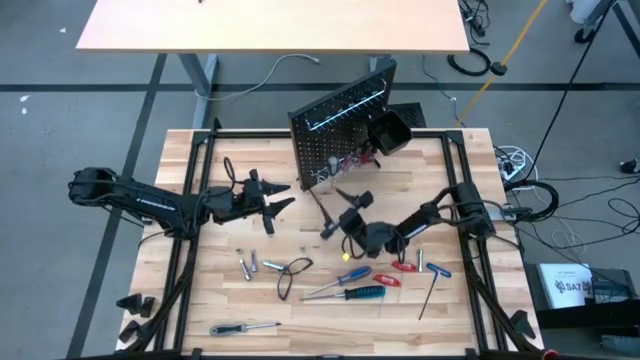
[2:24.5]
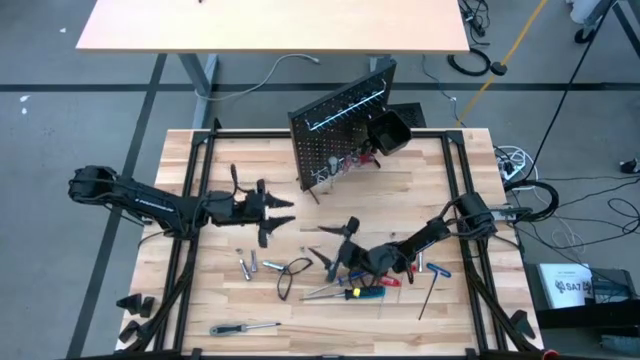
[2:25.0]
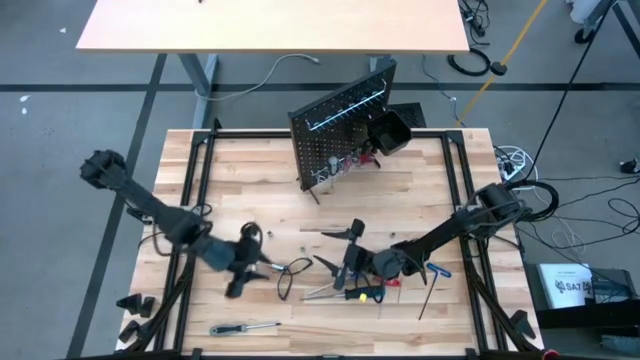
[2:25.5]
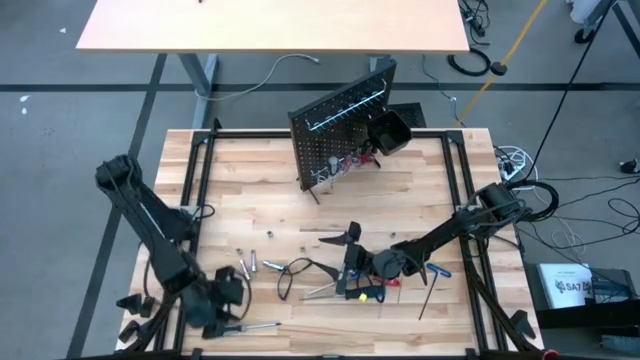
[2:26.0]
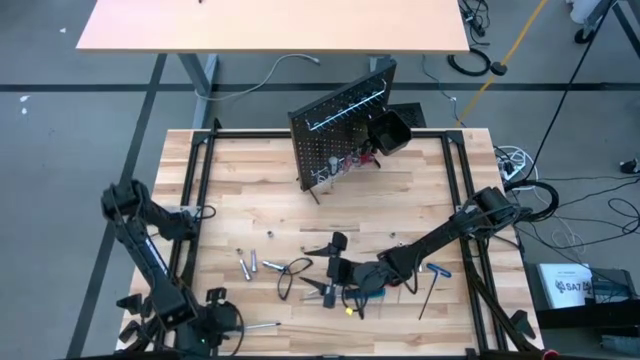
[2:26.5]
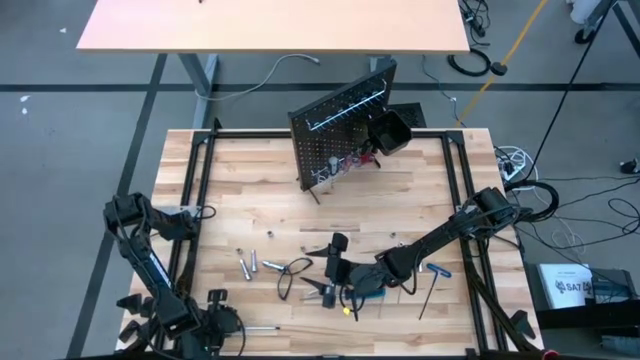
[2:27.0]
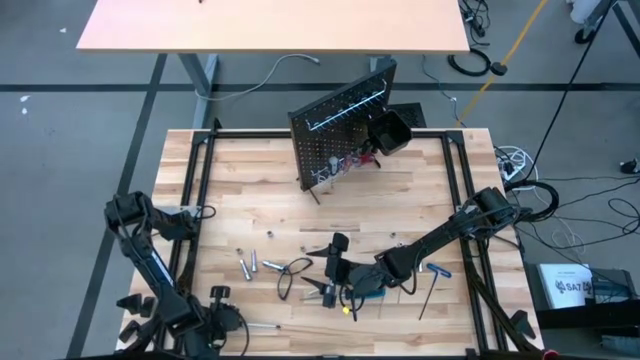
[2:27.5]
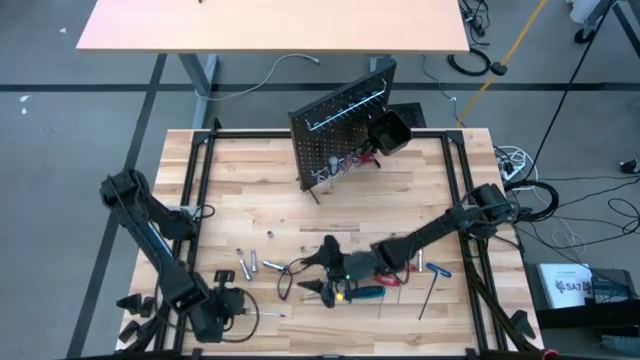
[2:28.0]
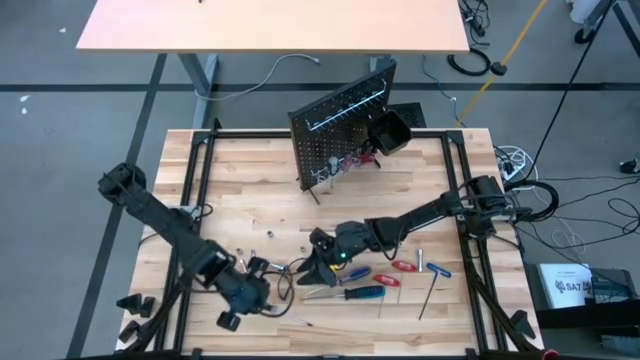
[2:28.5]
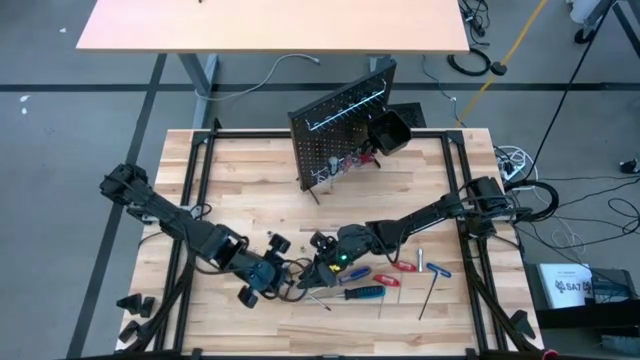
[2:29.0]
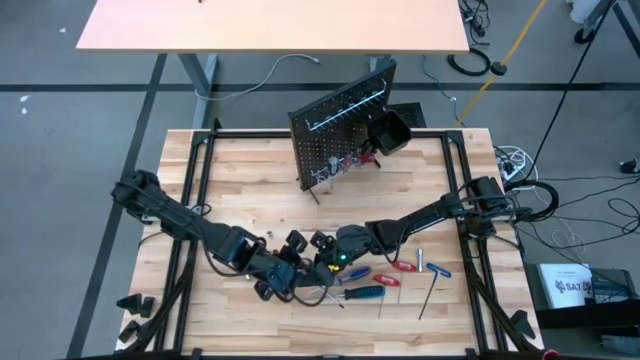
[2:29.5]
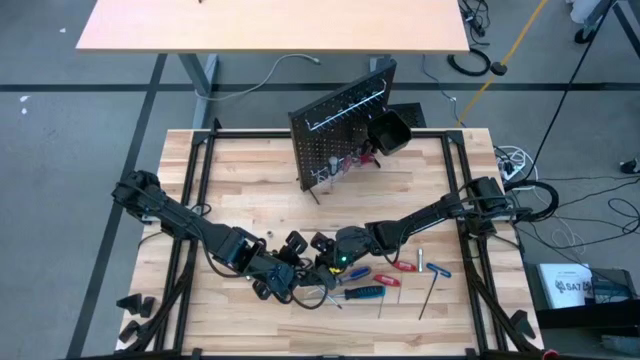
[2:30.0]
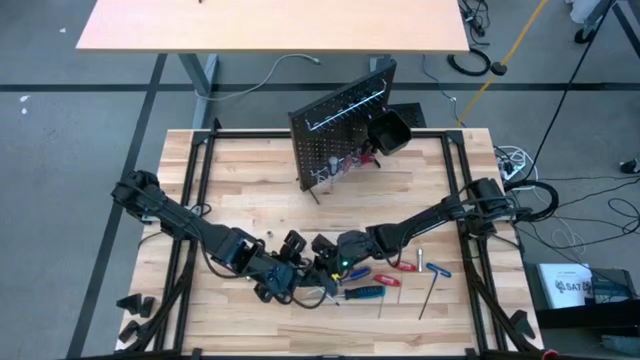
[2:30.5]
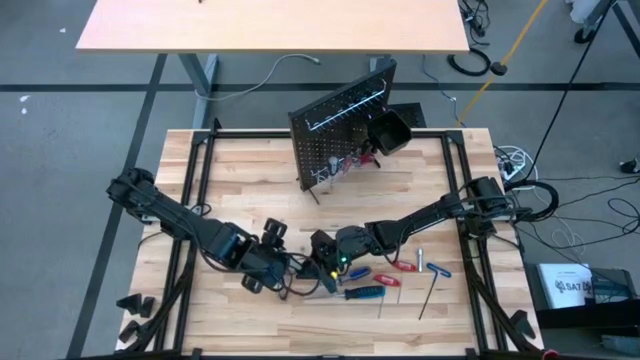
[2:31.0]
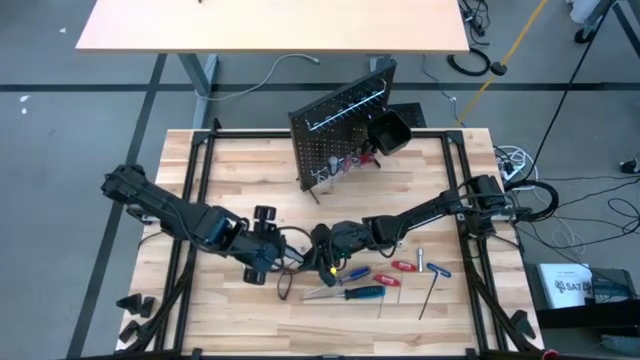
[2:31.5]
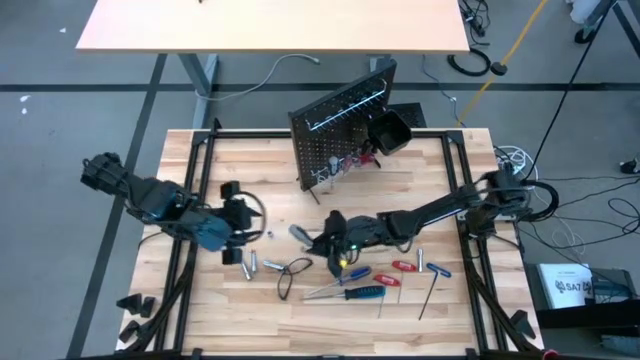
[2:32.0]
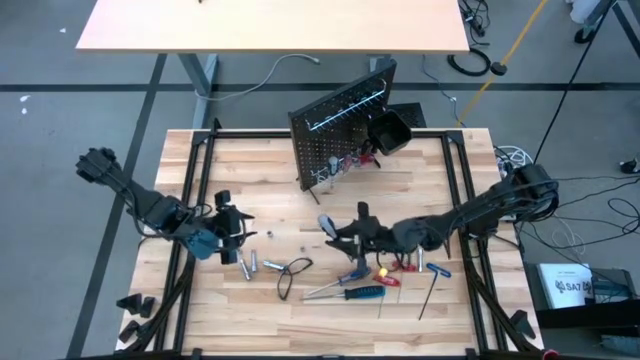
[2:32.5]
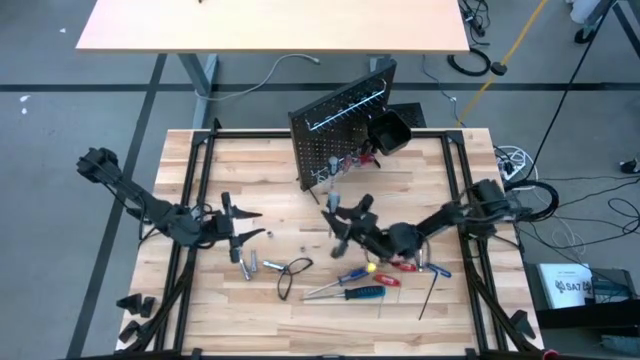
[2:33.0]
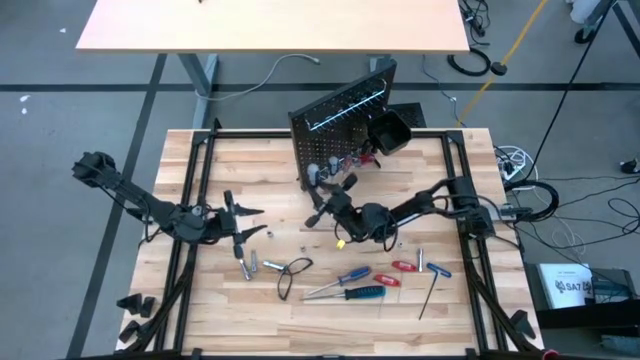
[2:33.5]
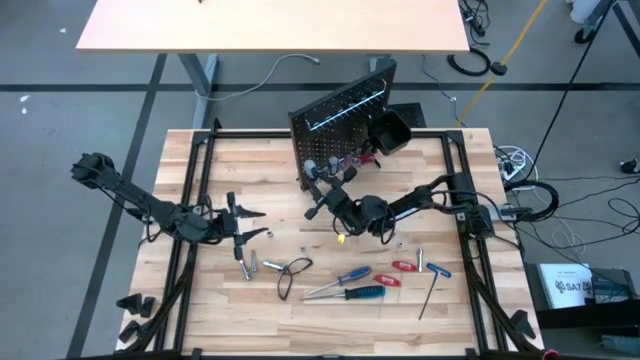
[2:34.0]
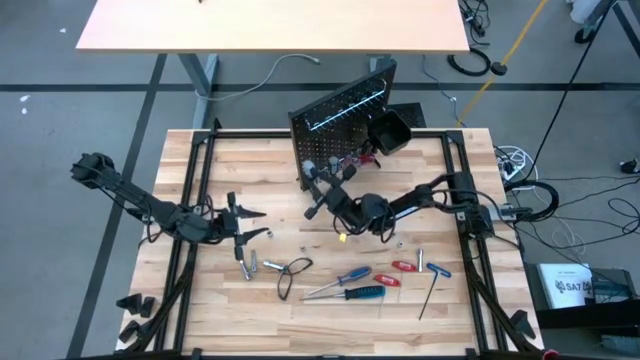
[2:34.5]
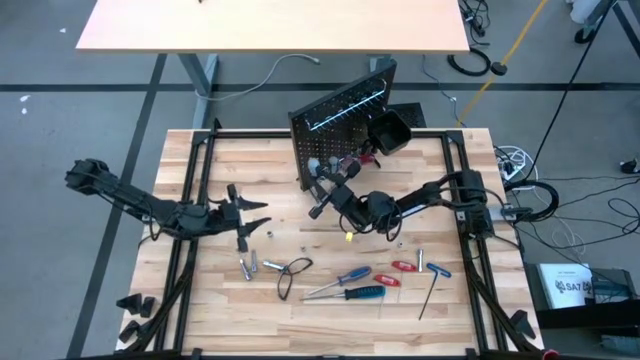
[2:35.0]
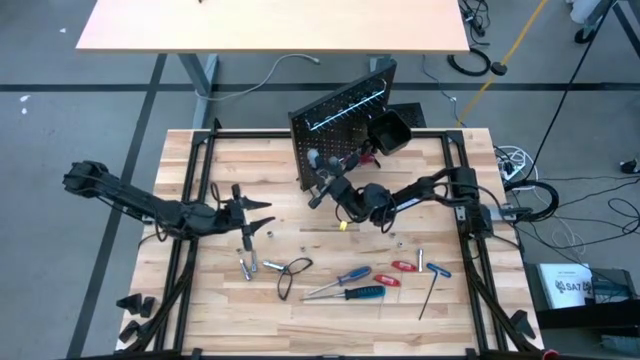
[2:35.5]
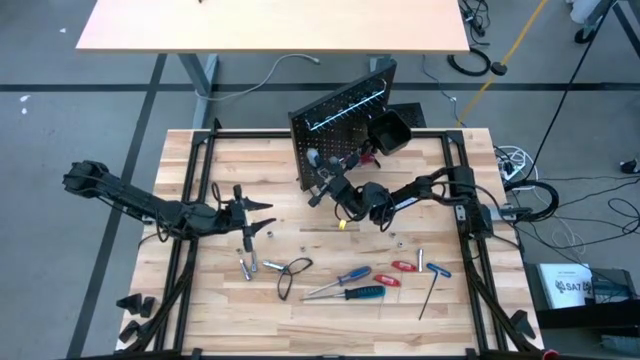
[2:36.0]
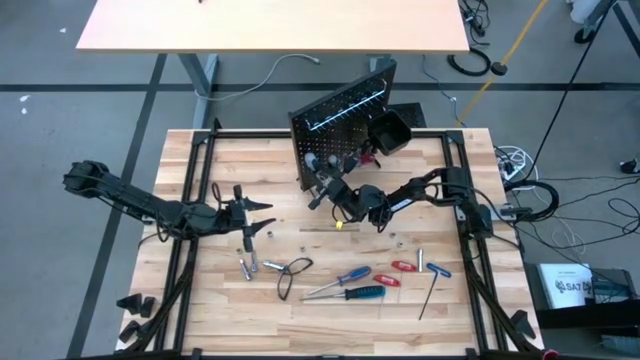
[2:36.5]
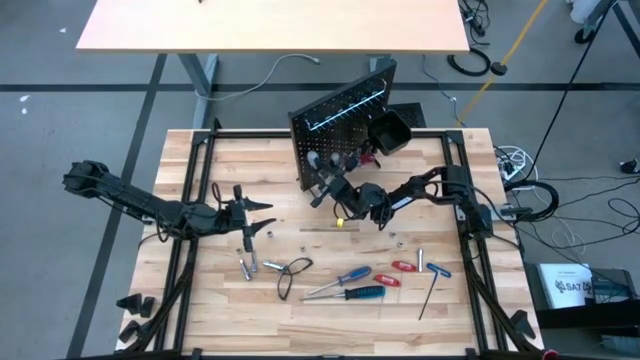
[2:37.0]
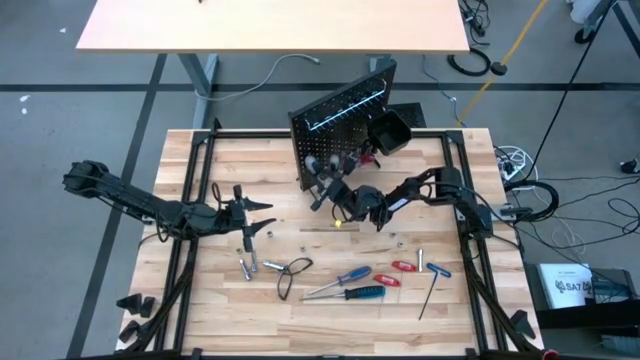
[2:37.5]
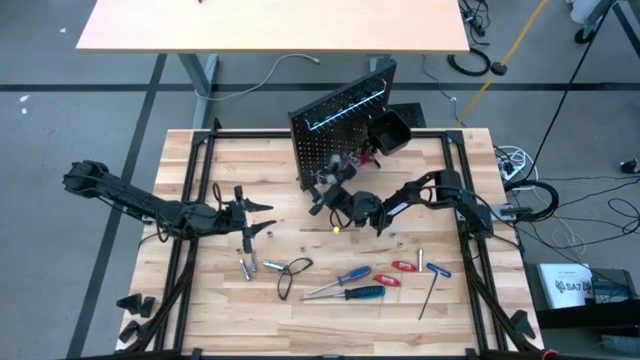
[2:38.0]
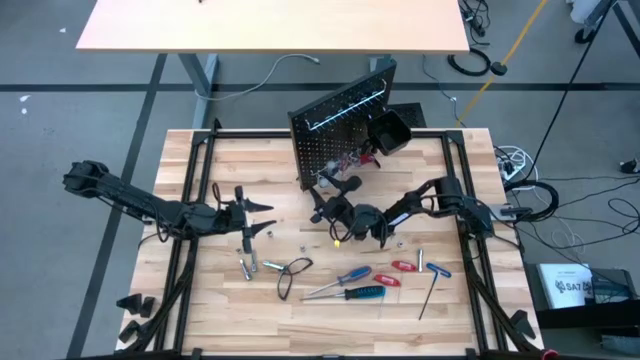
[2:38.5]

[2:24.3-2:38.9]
Task: Hang tools onto peg board
Hang the gray black screwdriver on the peg board

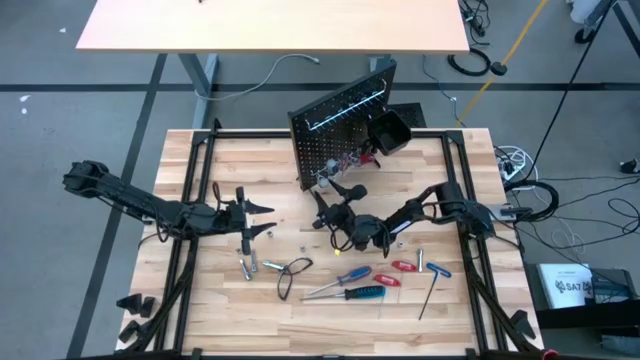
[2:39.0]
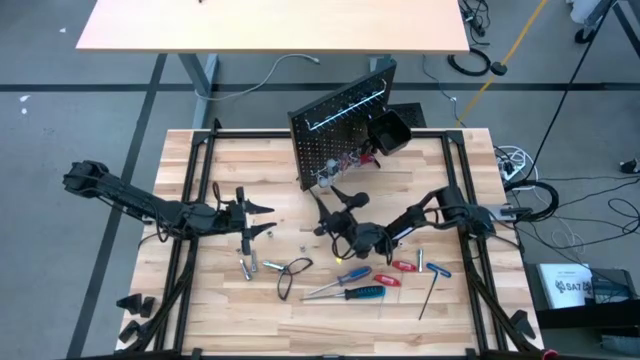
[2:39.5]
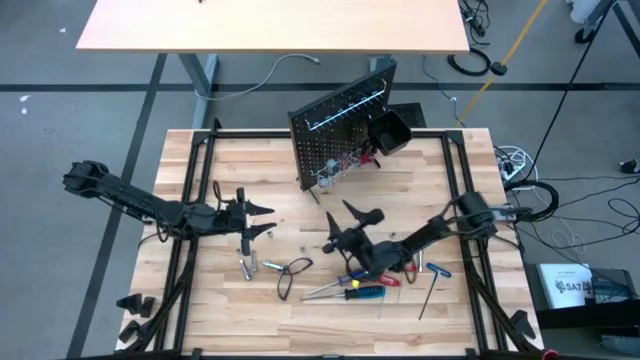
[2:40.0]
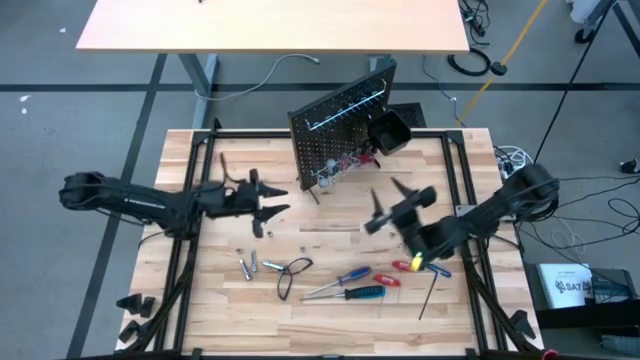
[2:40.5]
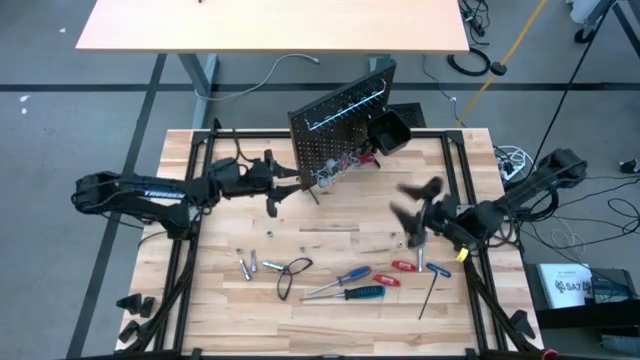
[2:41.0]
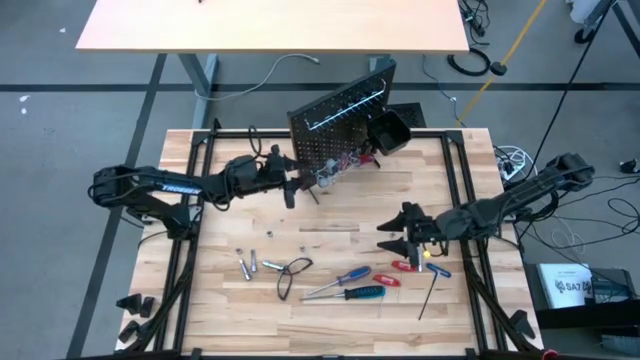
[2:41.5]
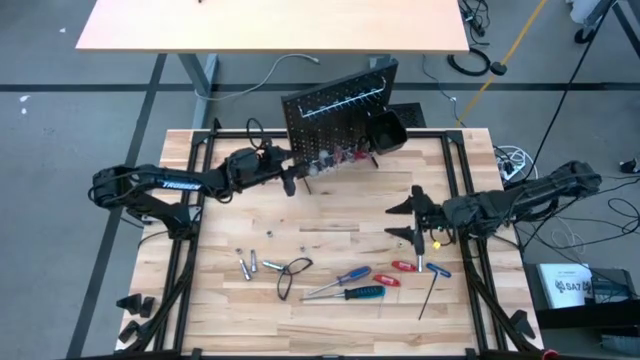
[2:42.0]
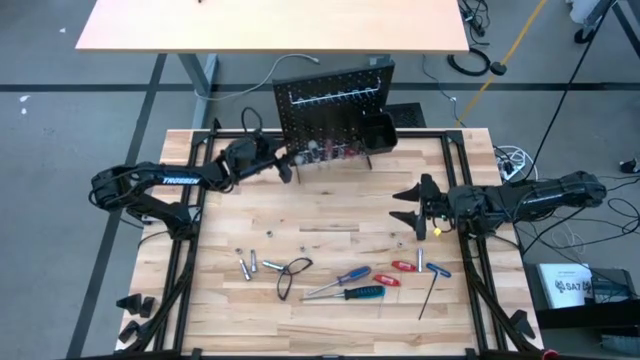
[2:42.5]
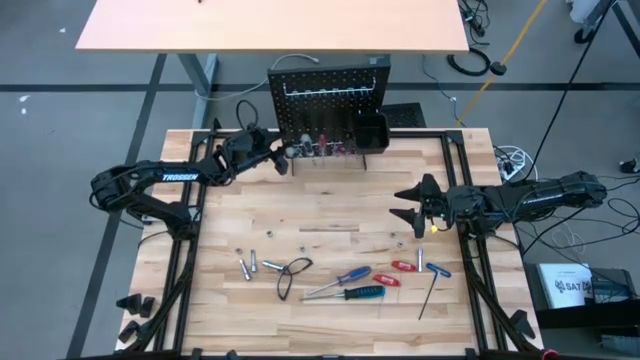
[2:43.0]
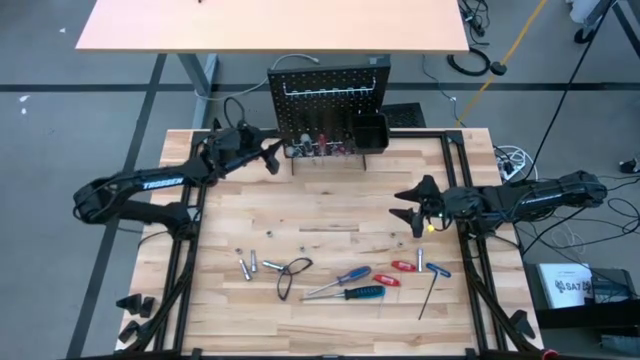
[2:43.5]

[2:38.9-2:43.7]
Adjust the pegboard

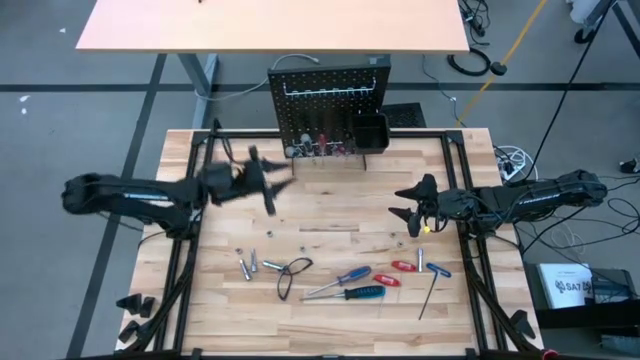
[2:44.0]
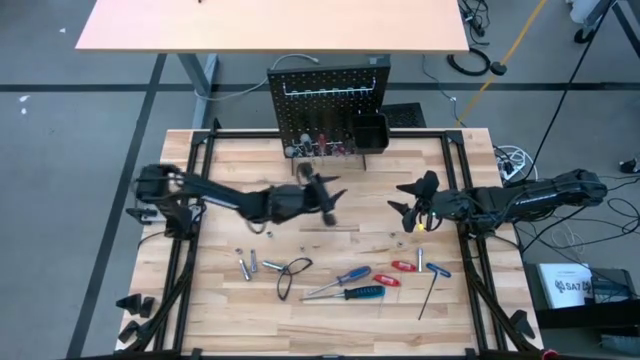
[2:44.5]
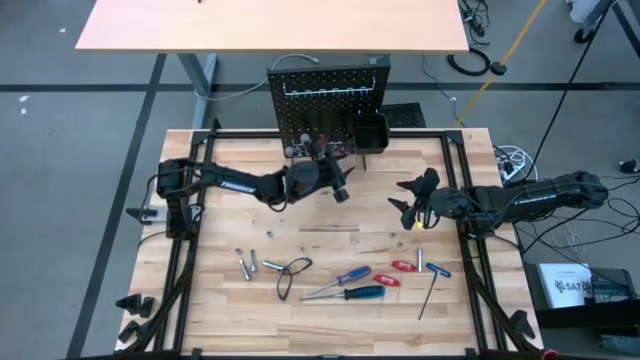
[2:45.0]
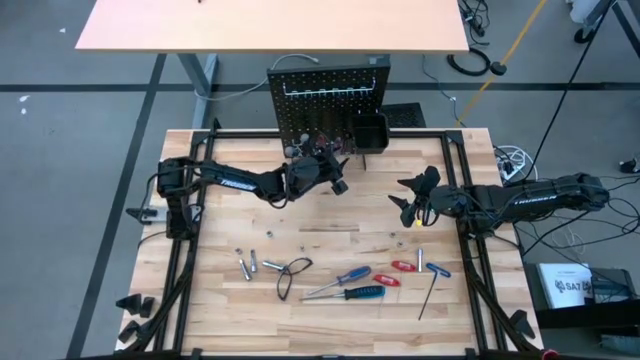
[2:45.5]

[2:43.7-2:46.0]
Adjust the right red screwdriver

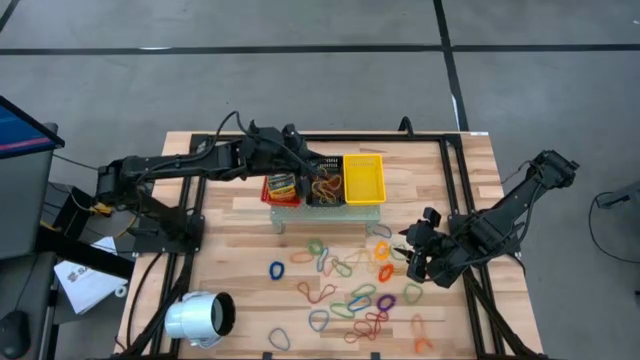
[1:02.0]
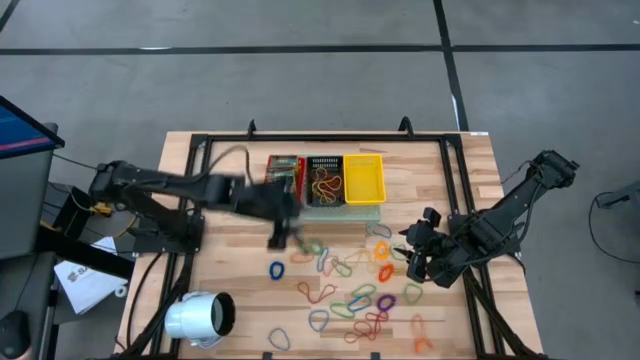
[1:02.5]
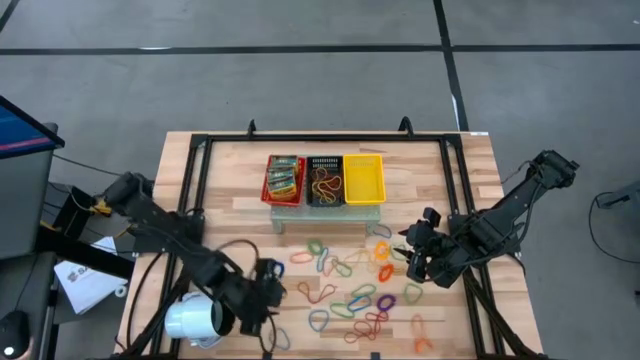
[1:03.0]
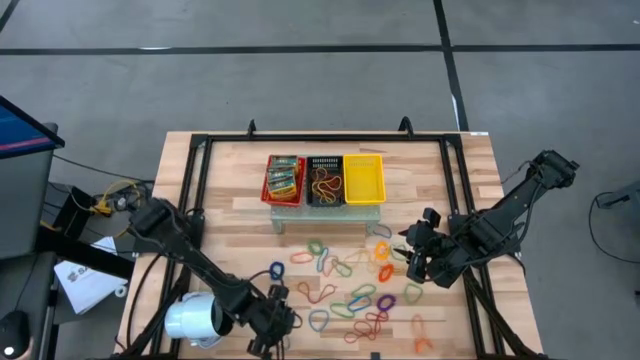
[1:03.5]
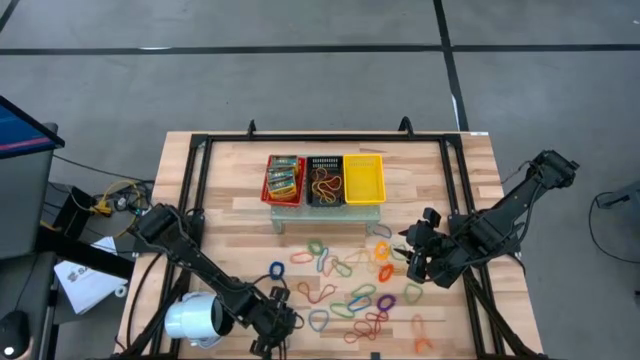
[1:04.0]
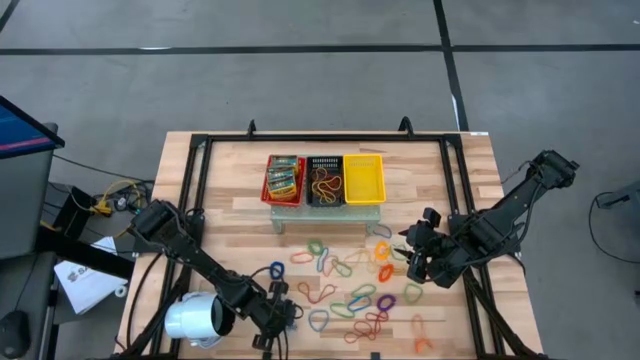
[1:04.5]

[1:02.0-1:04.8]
Task: Pick & Place Office Desk Supplies
Put the blue rubber band into the black bin on the shelf
